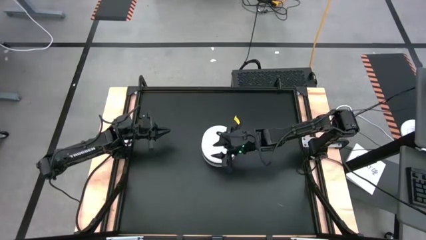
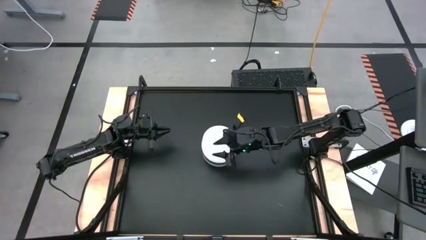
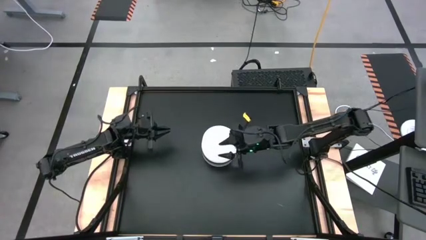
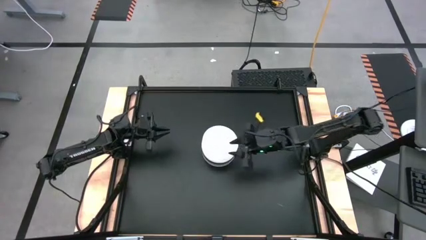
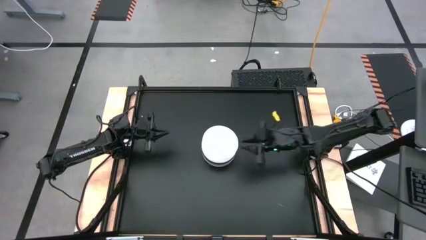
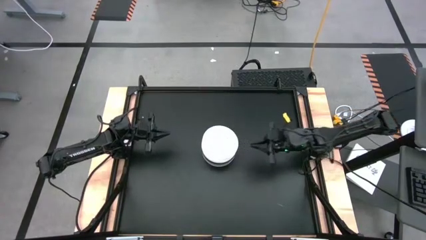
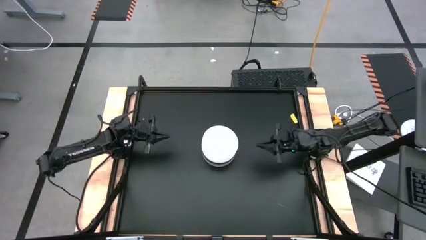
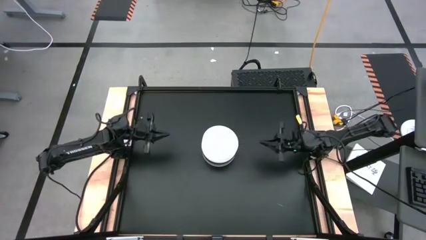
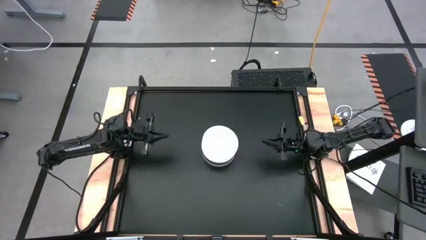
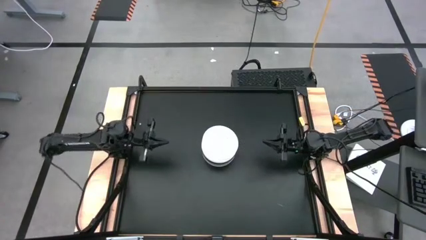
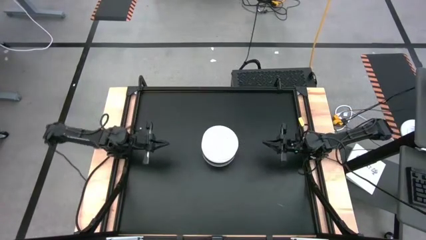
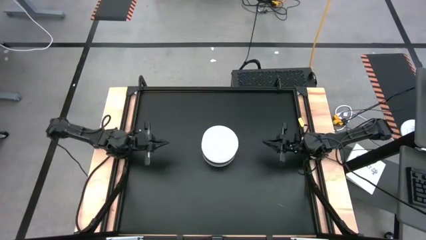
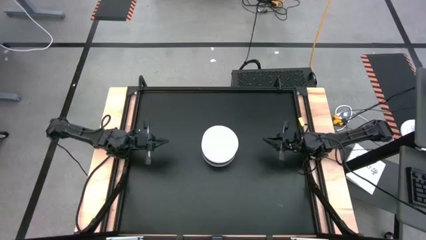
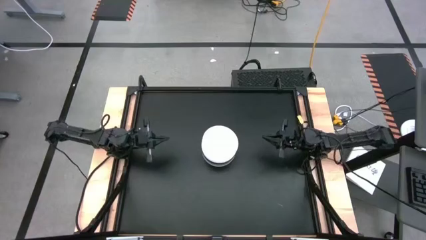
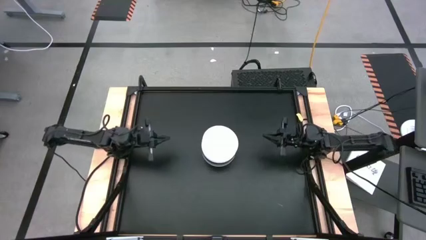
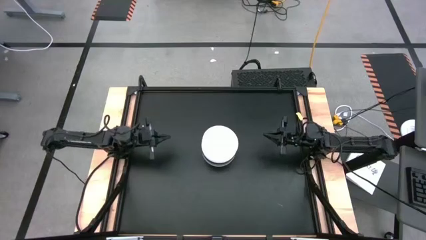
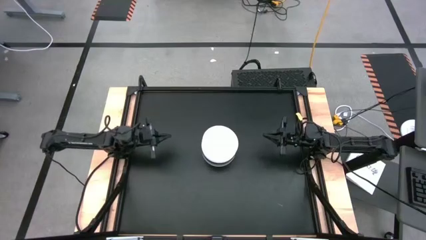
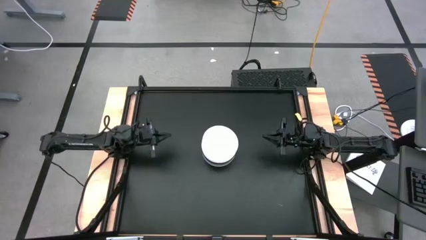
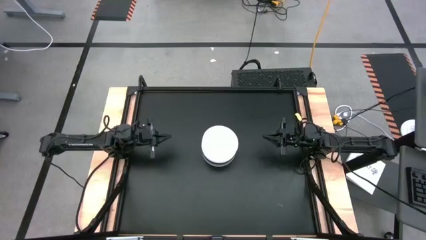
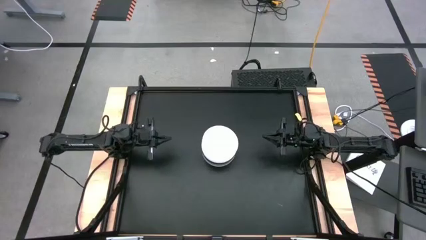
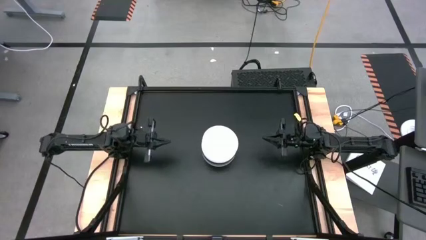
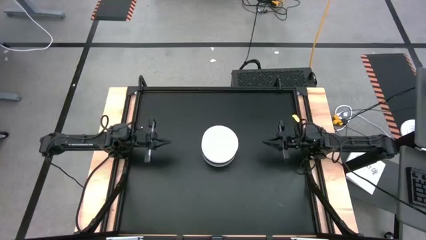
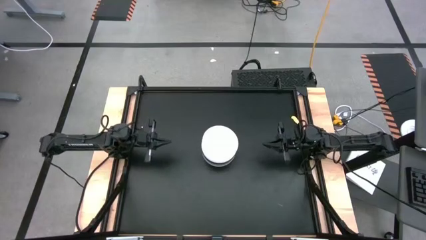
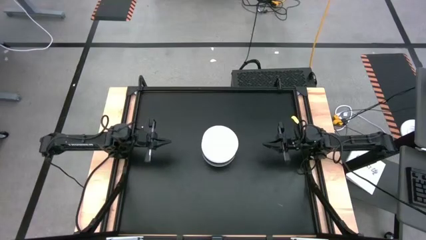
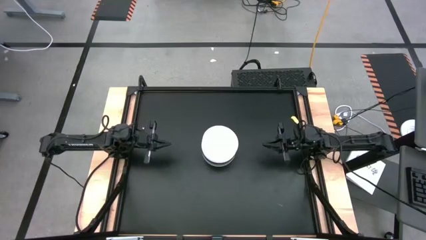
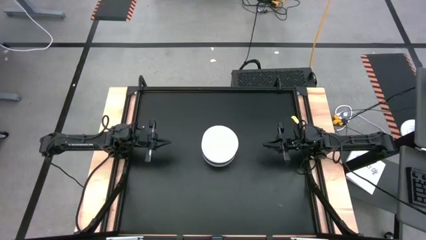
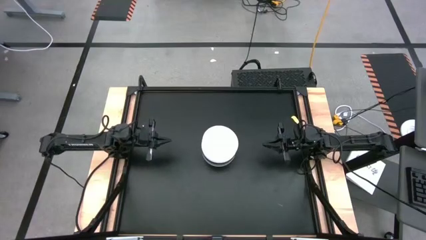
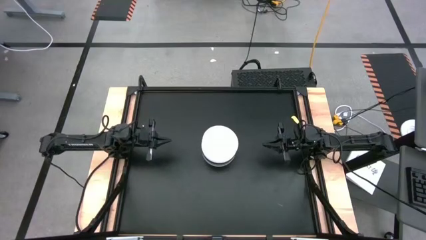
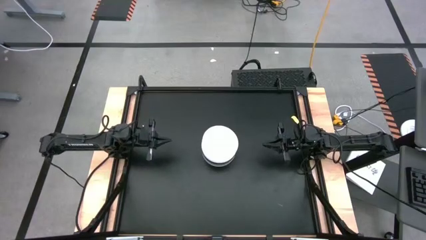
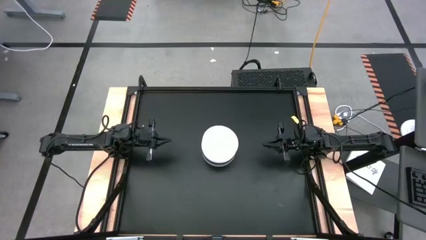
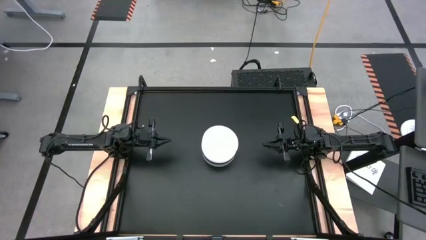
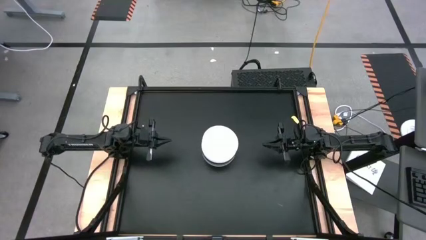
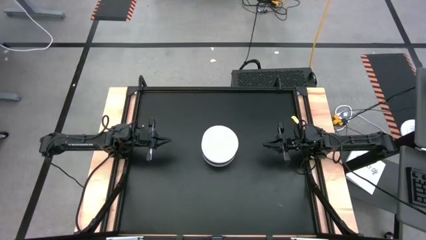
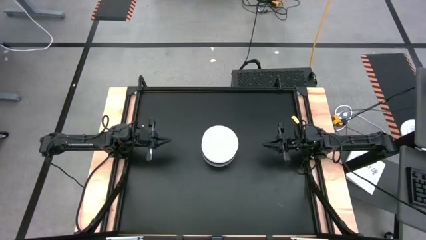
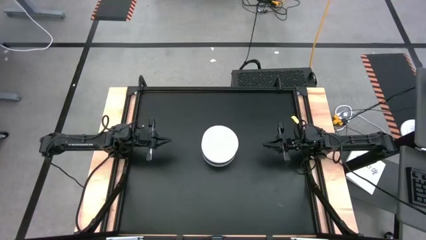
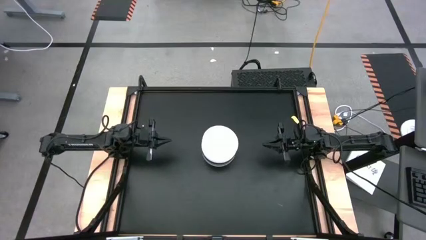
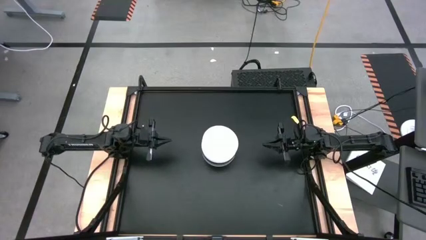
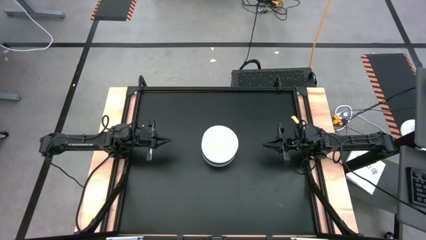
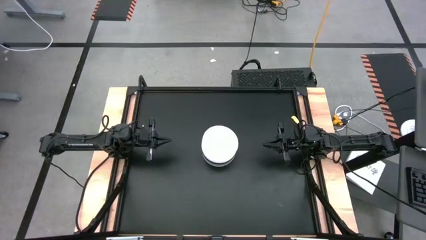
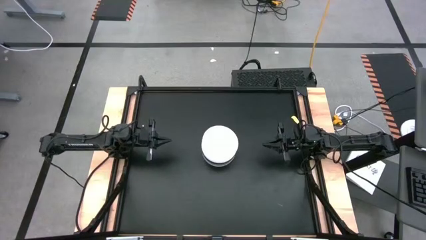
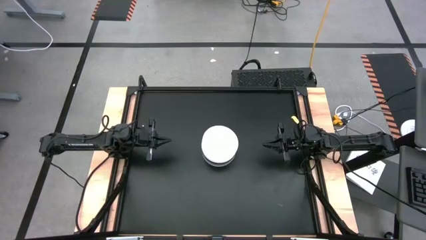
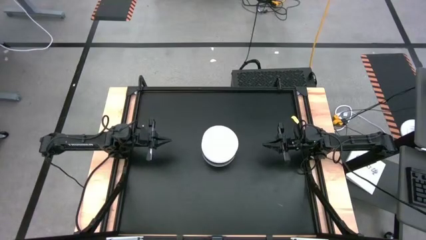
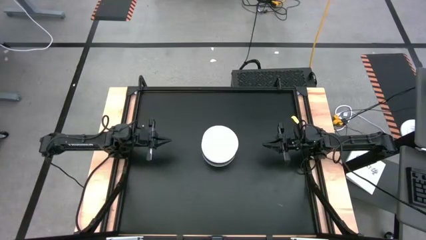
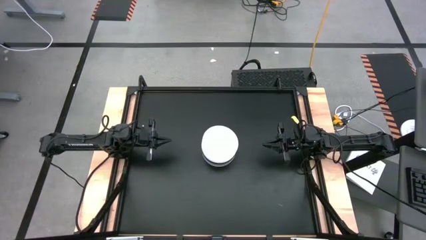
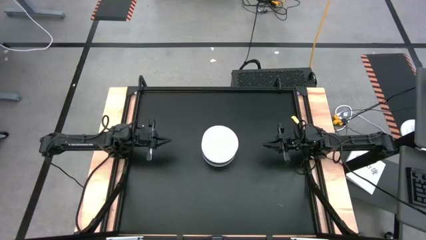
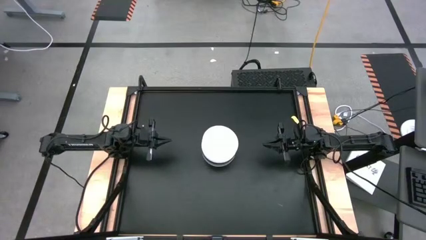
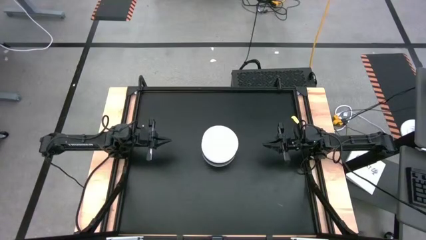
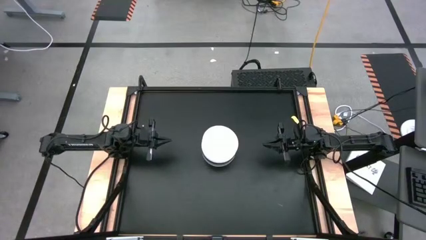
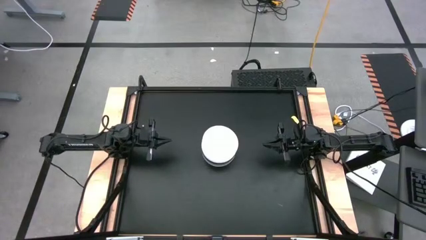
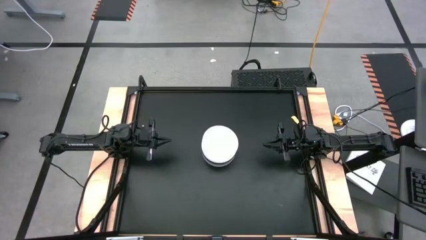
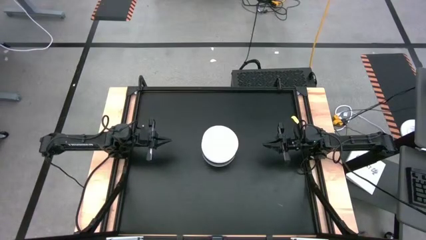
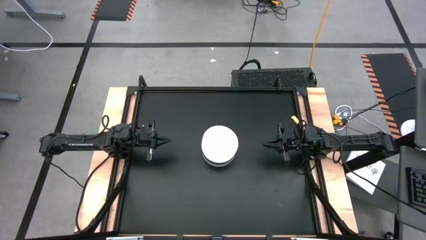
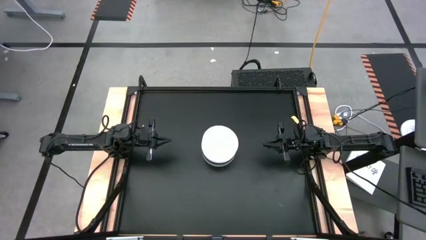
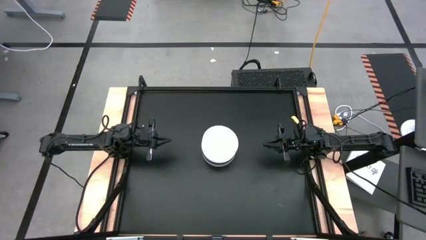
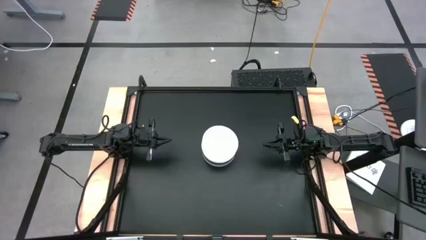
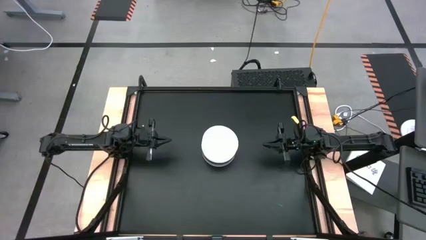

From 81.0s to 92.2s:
Task: Nest bowls inside each other
Return to Home Position

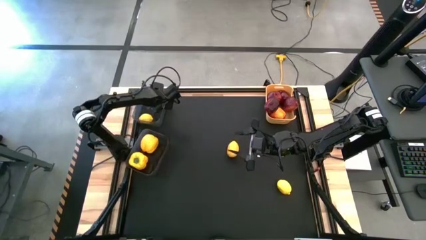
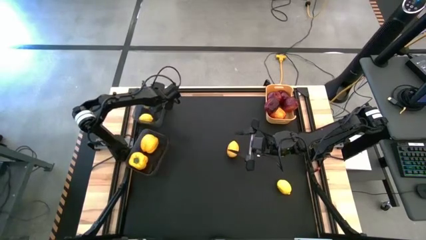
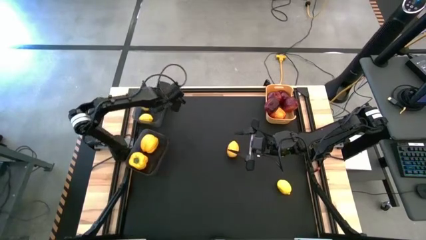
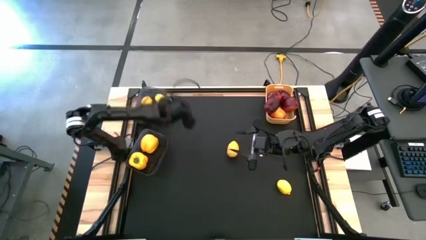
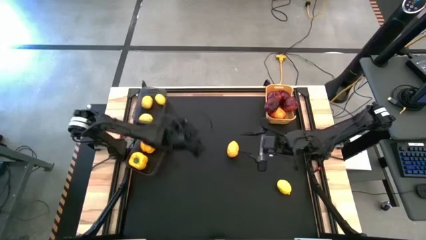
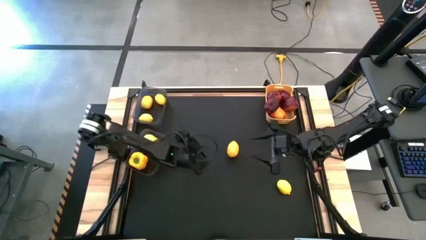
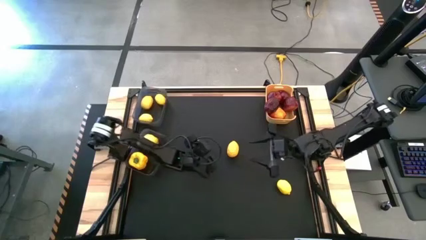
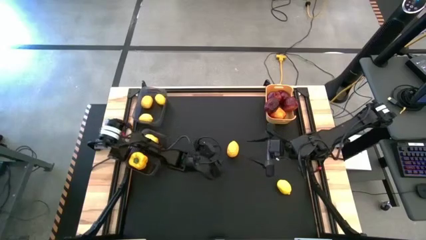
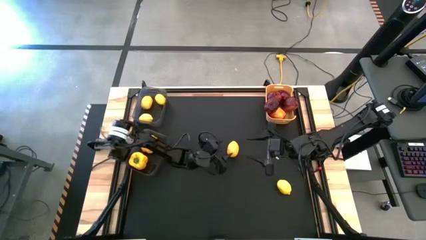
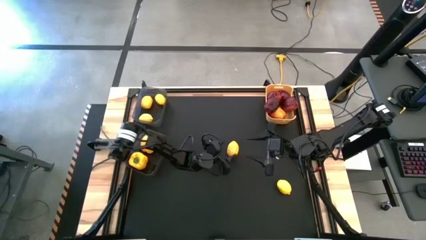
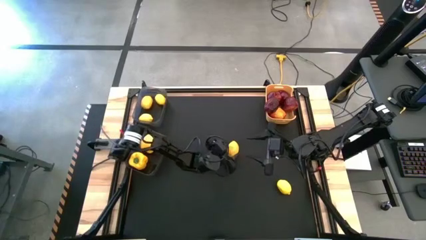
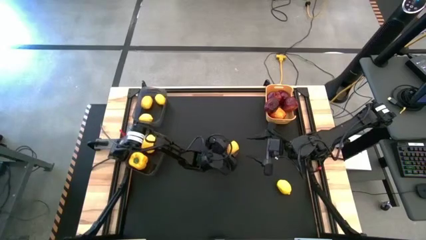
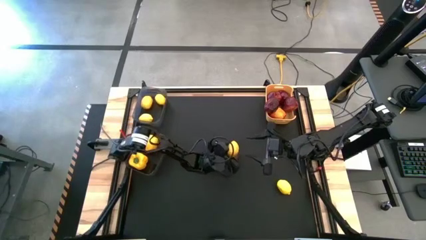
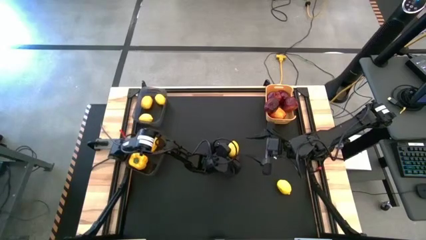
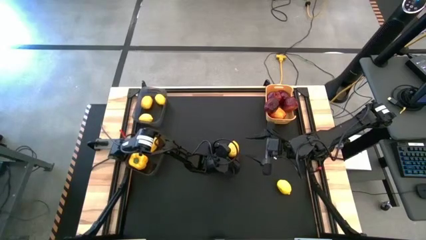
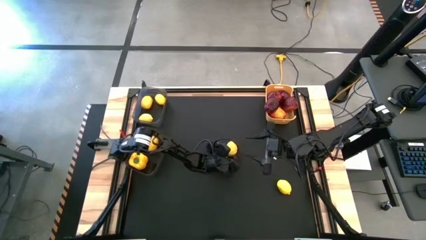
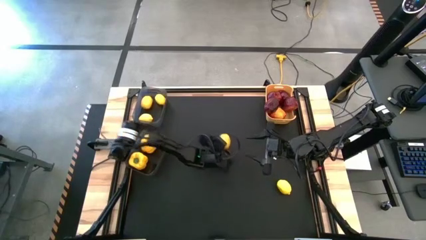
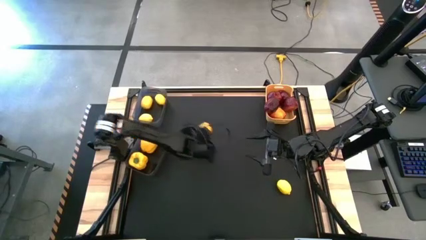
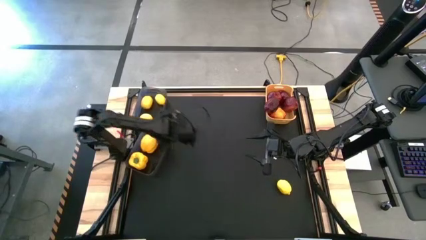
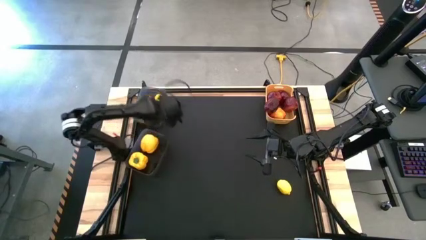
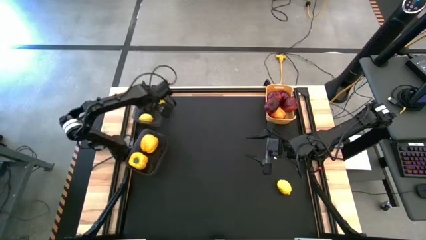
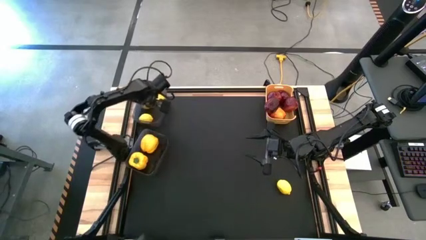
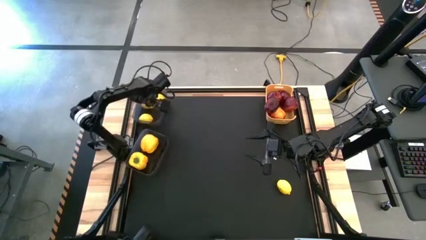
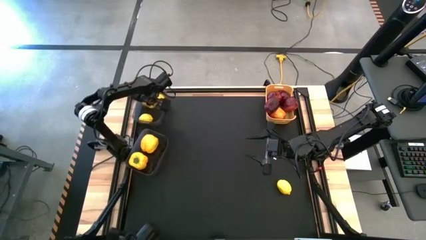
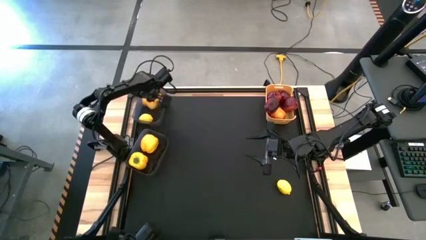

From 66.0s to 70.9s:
Task: Sort produce into baskets
Put the lemon into the top black bin
